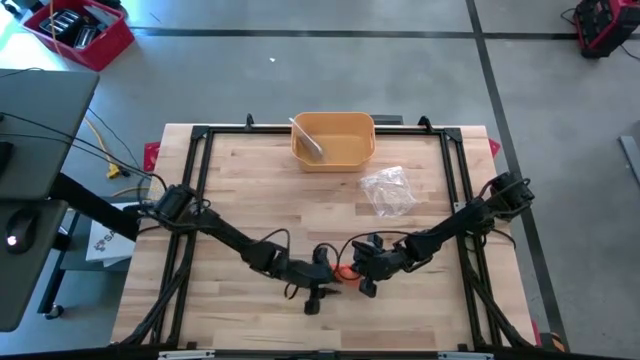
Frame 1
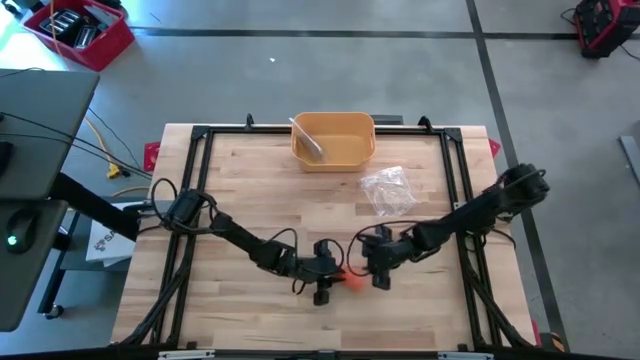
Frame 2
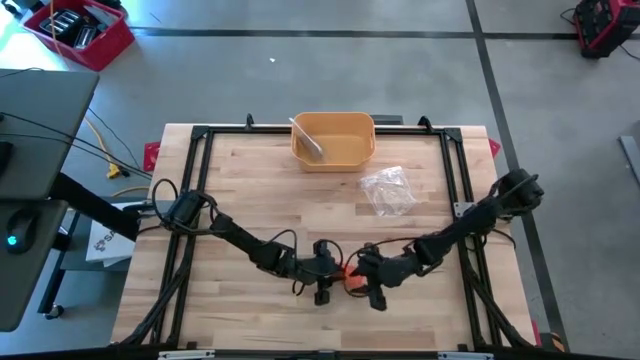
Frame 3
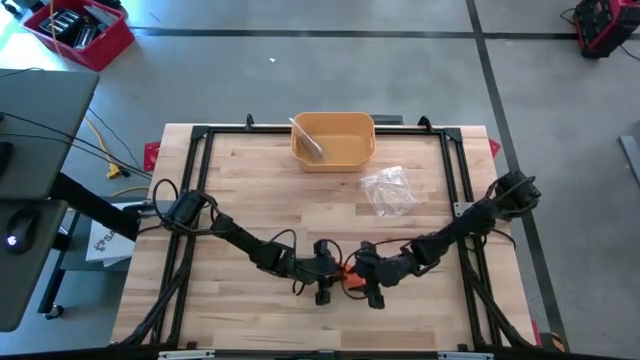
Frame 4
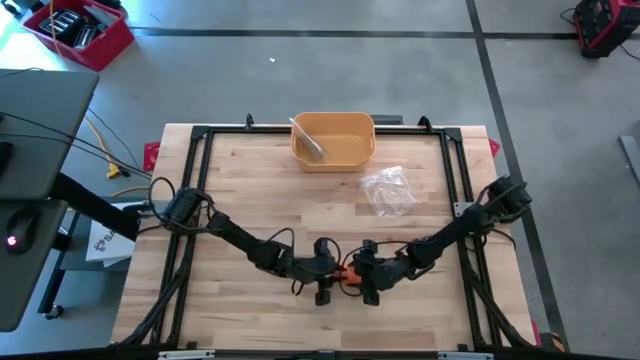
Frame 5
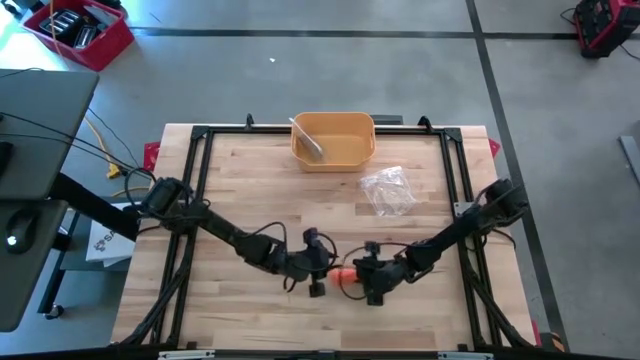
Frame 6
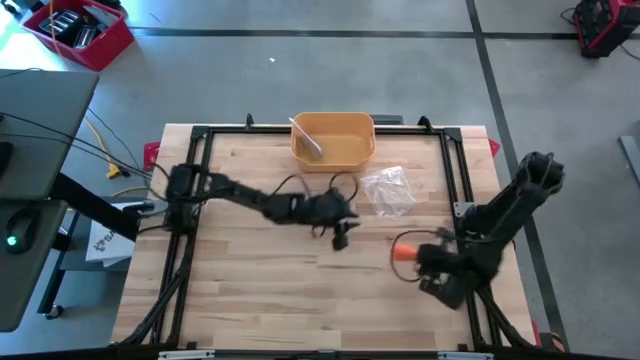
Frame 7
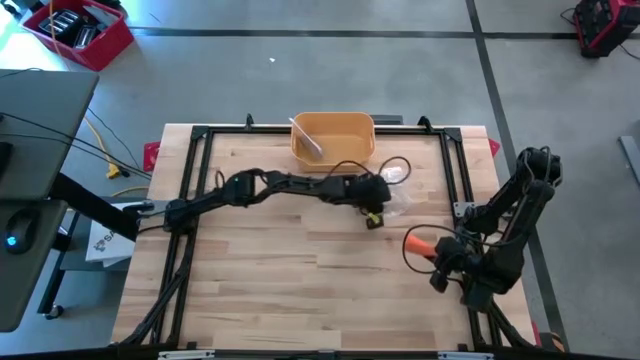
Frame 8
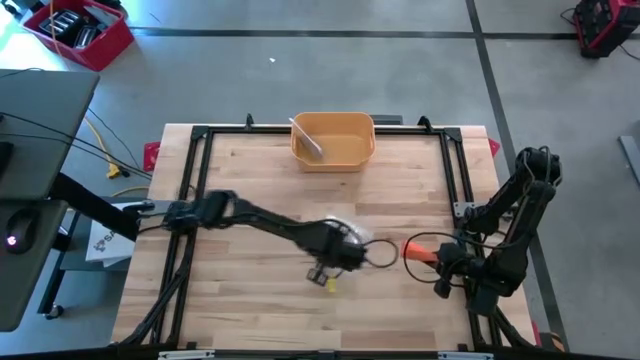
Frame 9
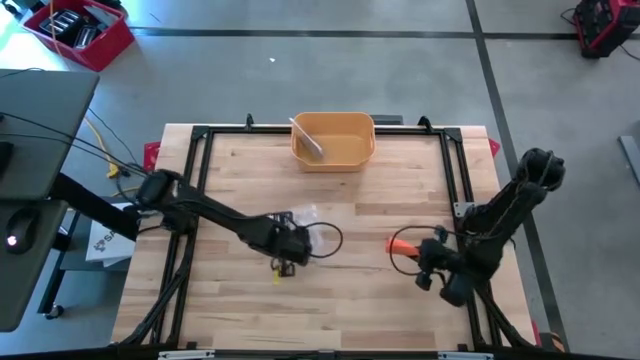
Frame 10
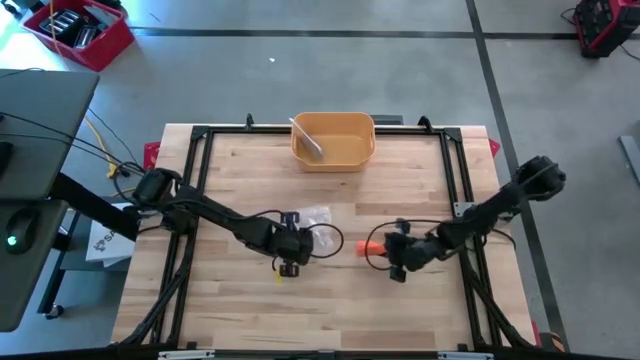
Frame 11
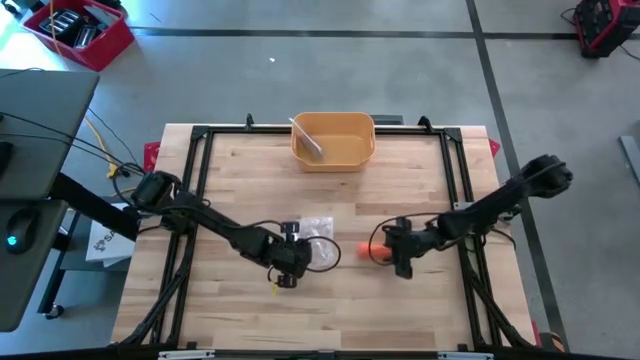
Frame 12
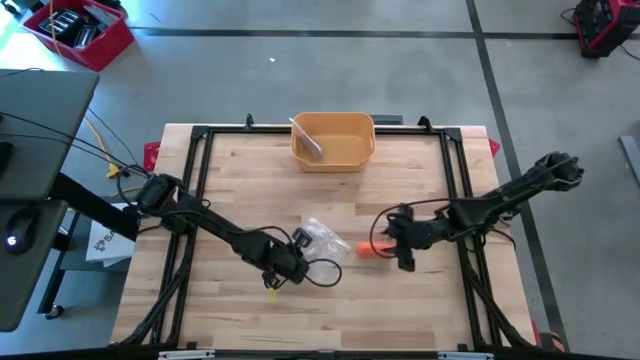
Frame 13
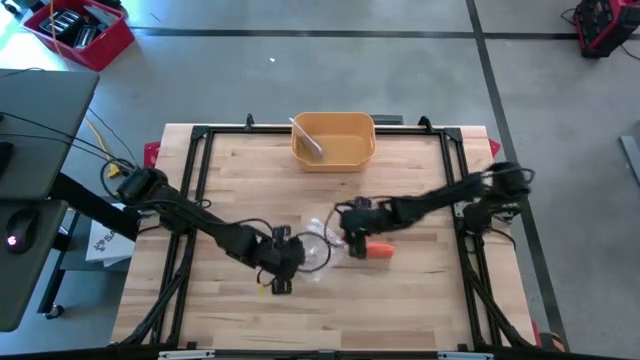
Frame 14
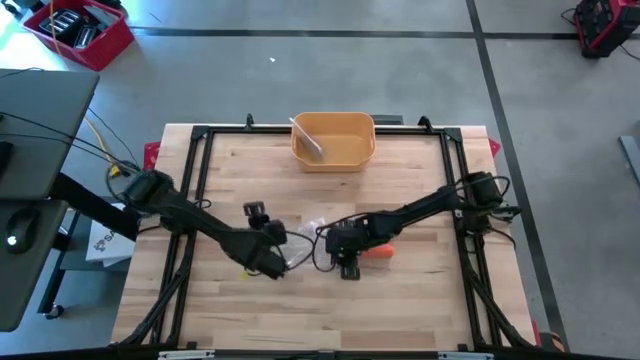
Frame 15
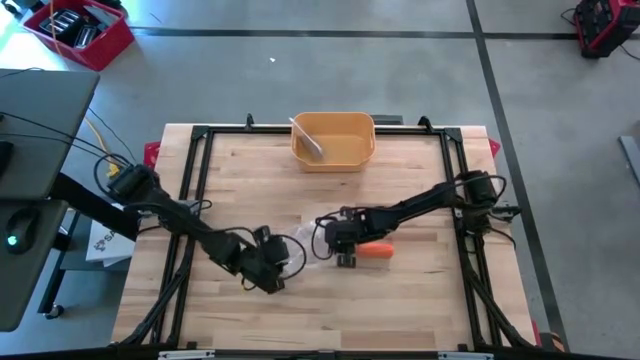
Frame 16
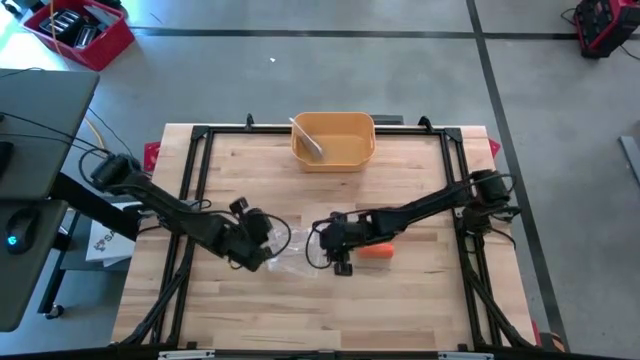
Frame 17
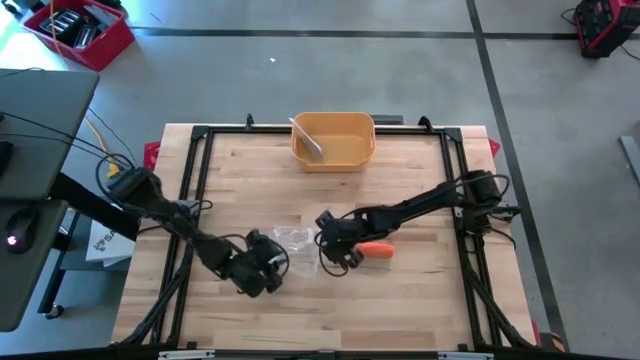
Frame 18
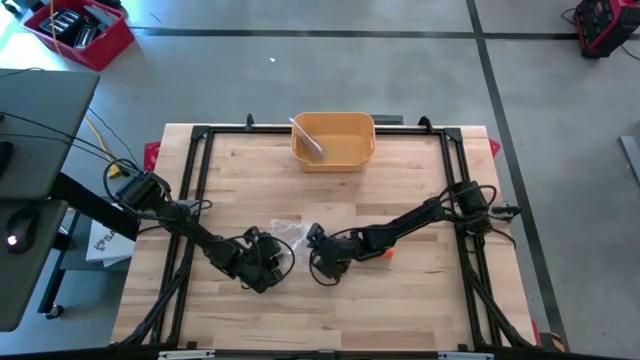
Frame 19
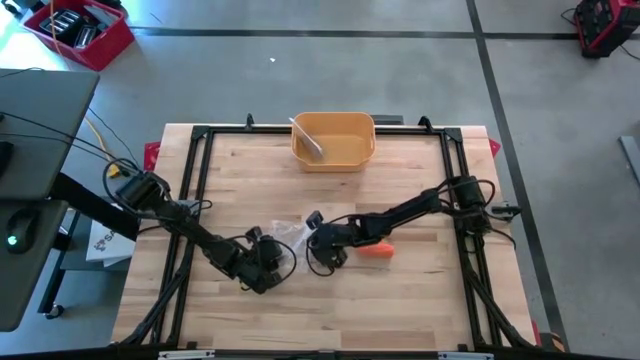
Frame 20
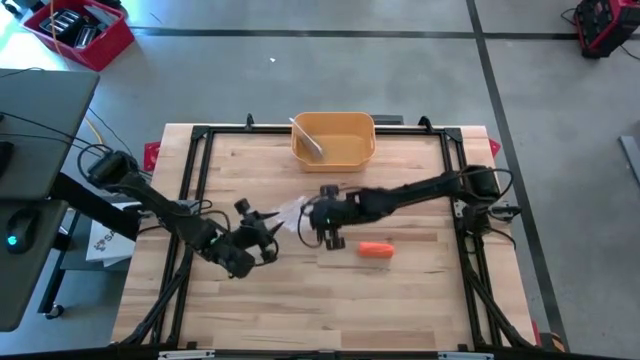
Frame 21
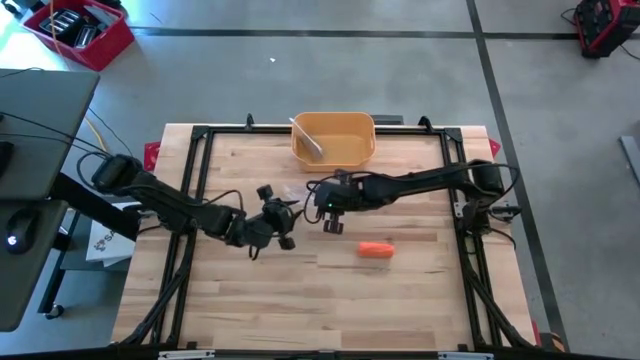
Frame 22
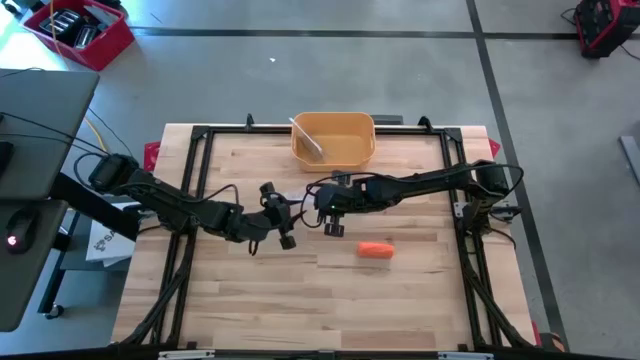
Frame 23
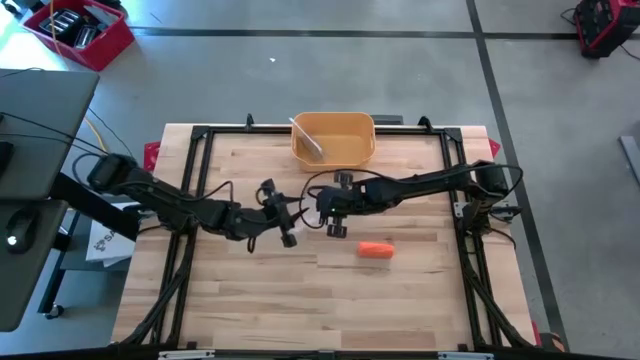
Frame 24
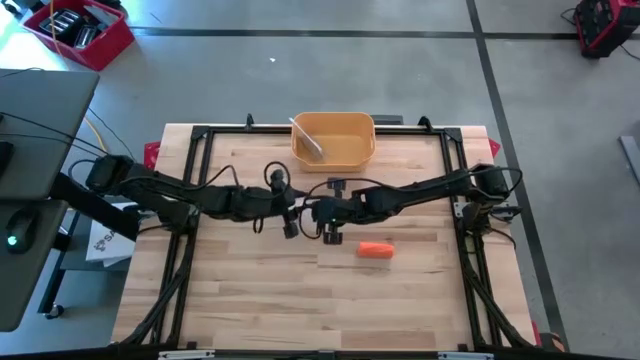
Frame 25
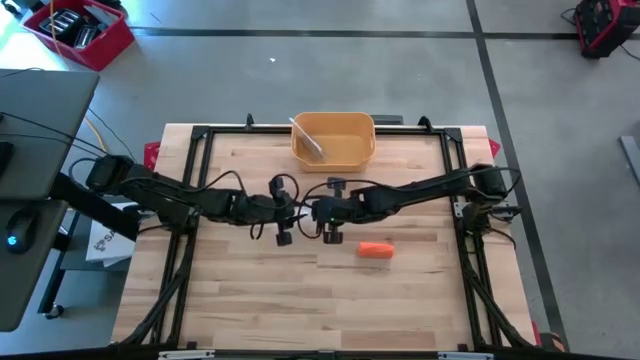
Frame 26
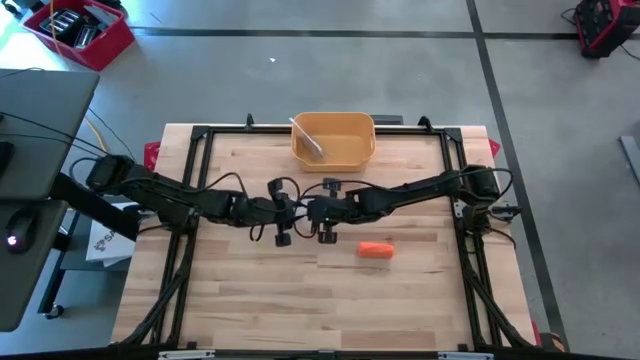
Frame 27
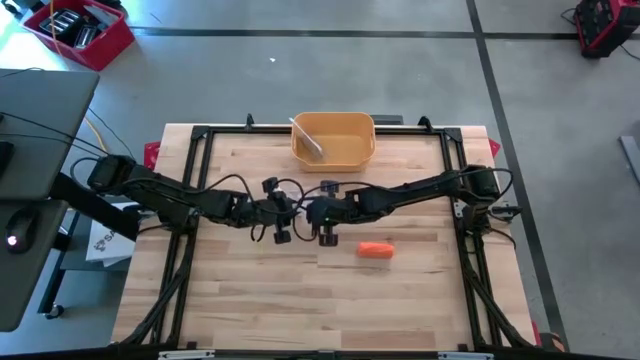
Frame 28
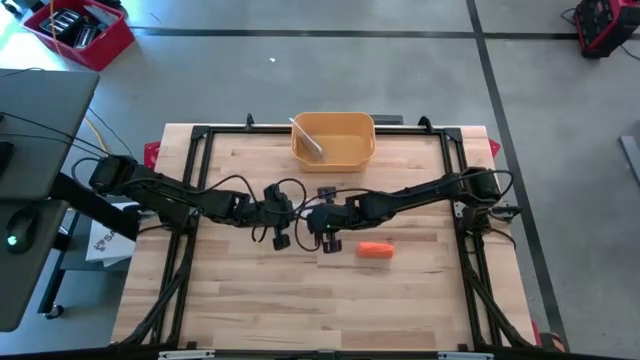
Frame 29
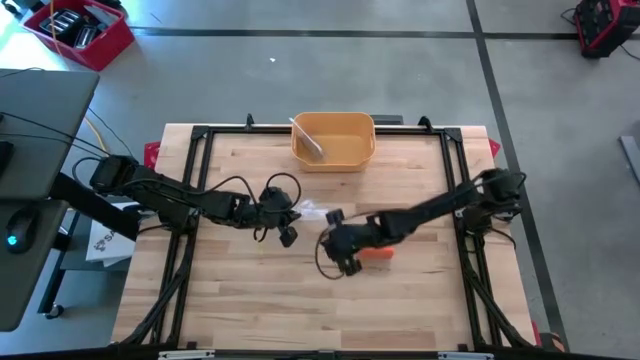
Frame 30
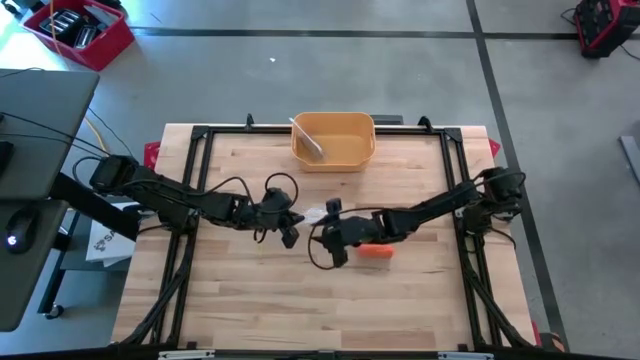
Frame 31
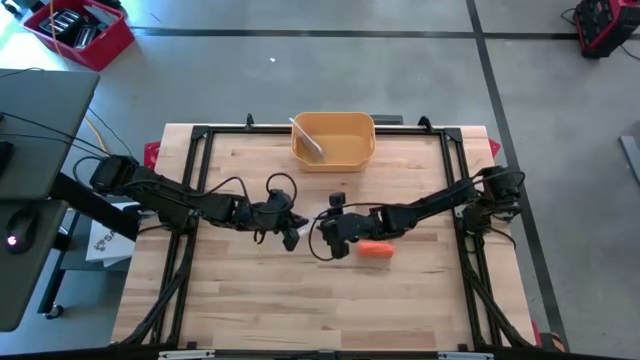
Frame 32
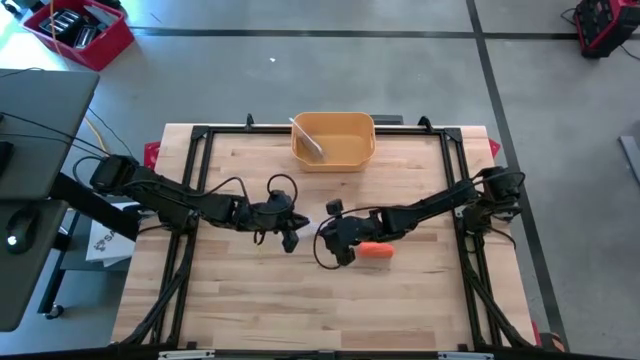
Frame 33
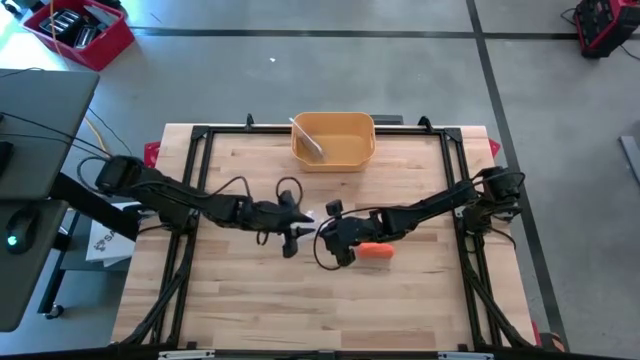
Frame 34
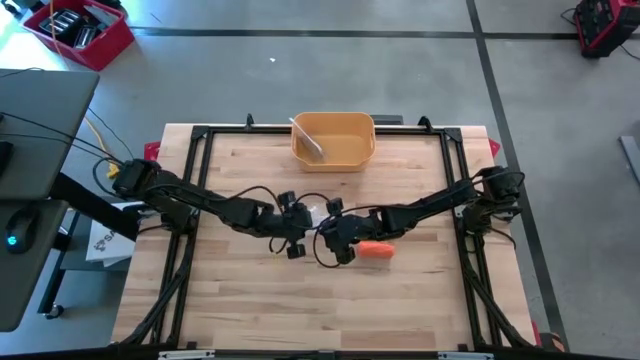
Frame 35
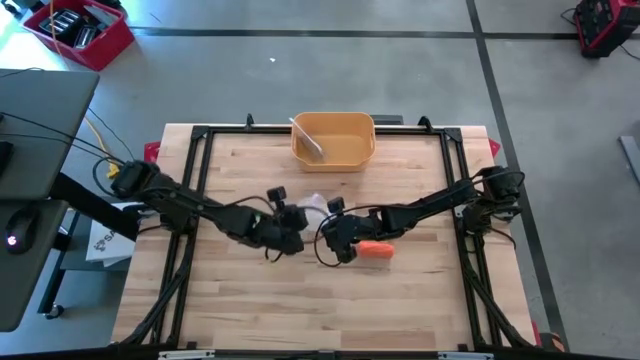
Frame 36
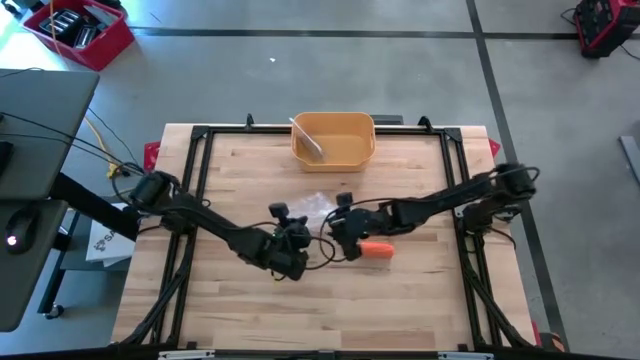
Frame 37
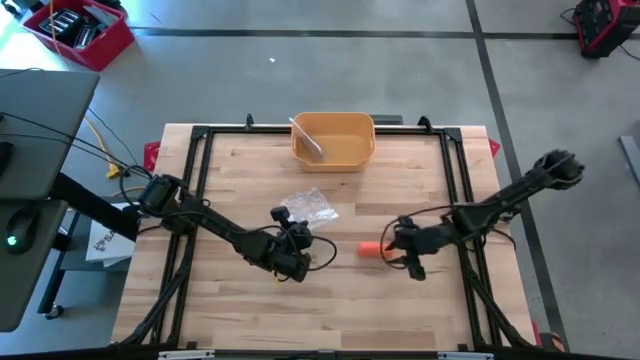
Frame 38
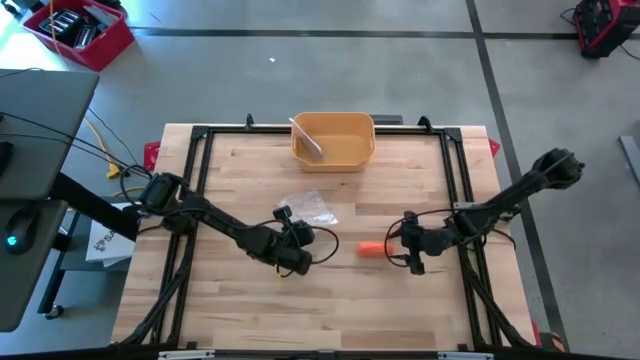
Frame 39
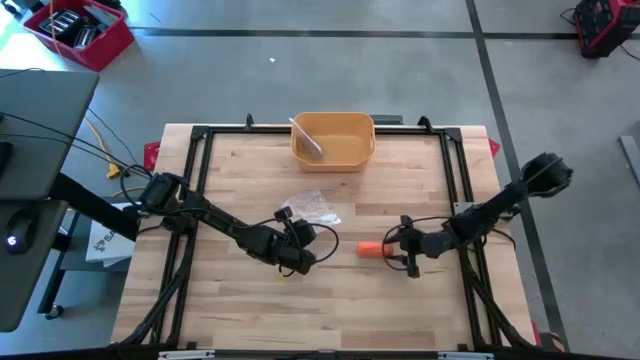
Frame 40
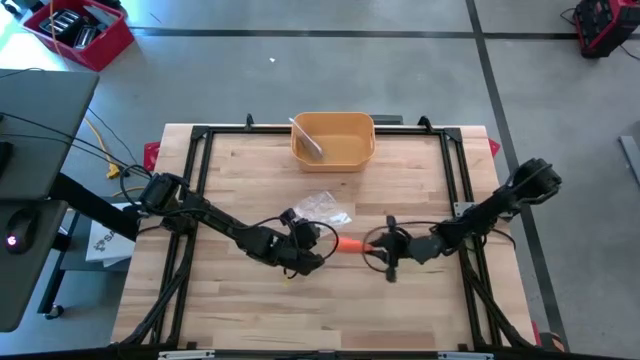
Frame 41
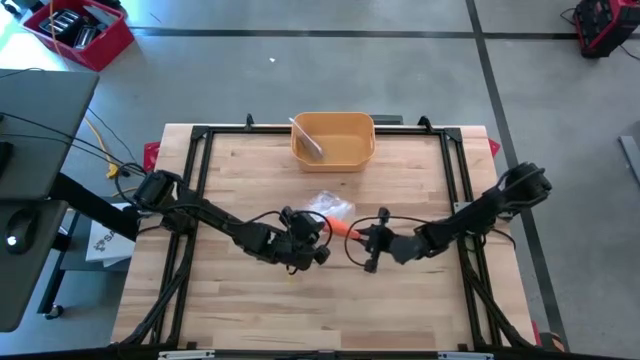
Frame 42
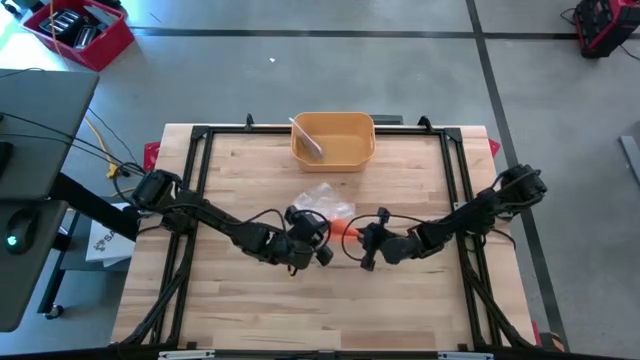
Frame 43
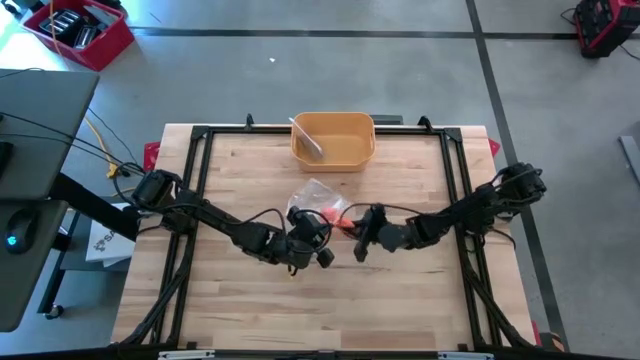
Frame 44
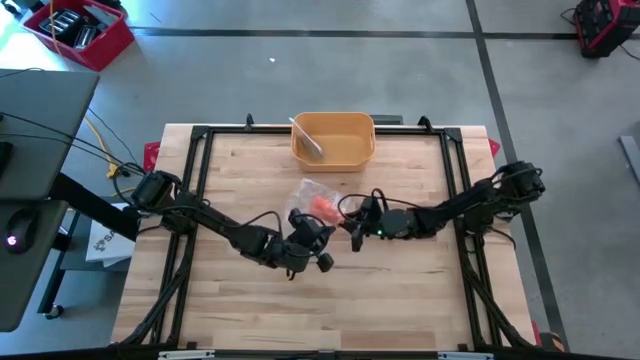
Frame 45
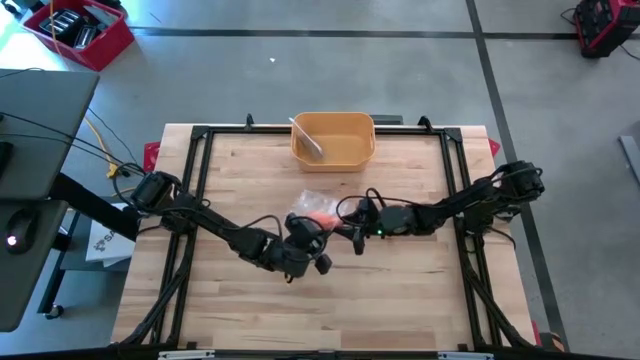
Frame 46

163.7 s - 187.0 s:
Task: Roll bandage
Put the rolled orange bandage into the transparent zip bag
